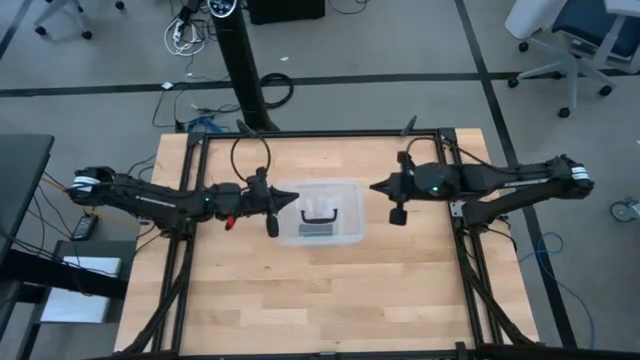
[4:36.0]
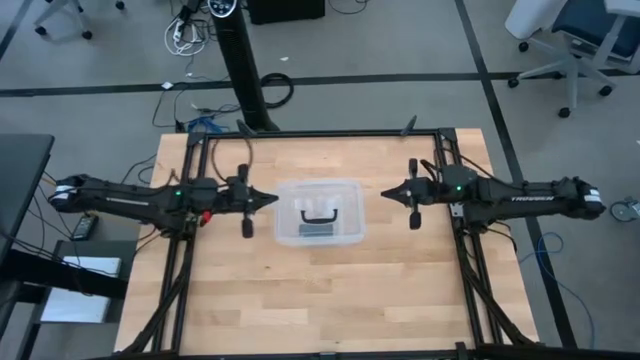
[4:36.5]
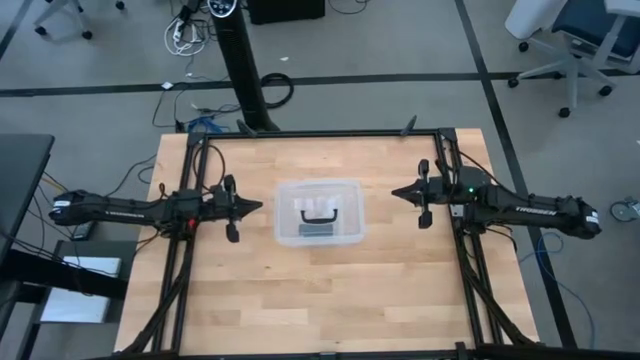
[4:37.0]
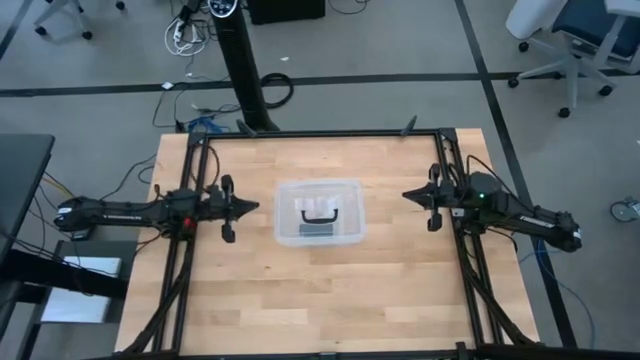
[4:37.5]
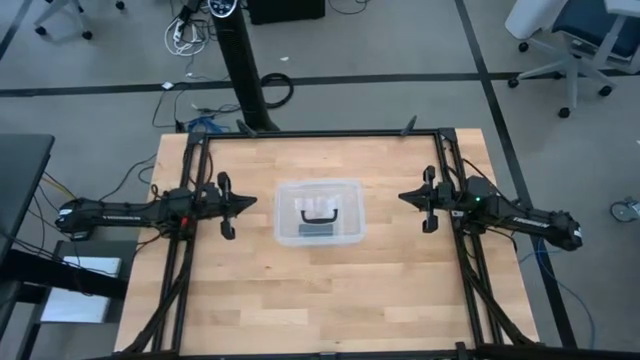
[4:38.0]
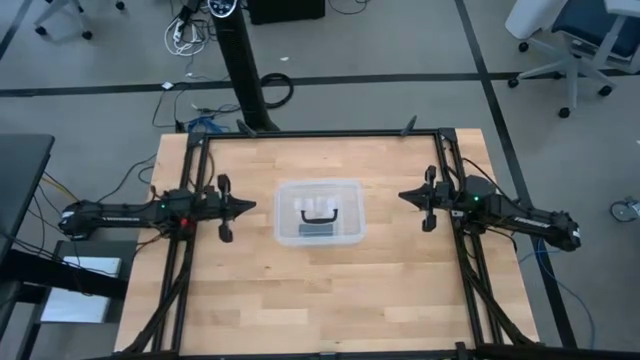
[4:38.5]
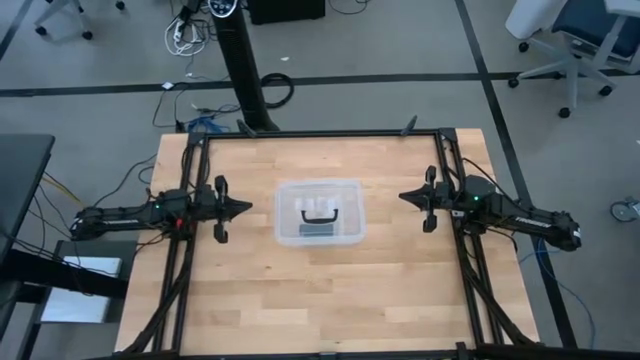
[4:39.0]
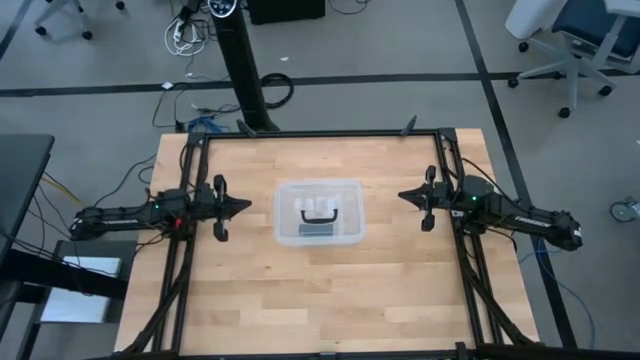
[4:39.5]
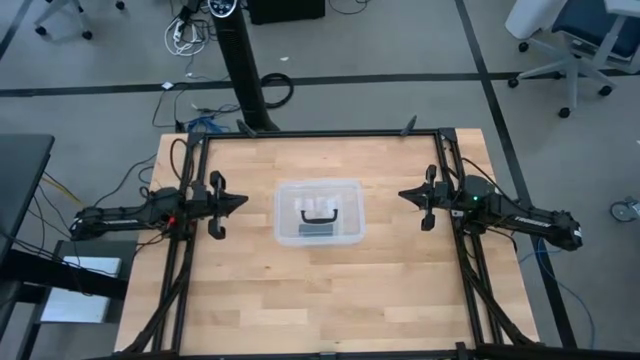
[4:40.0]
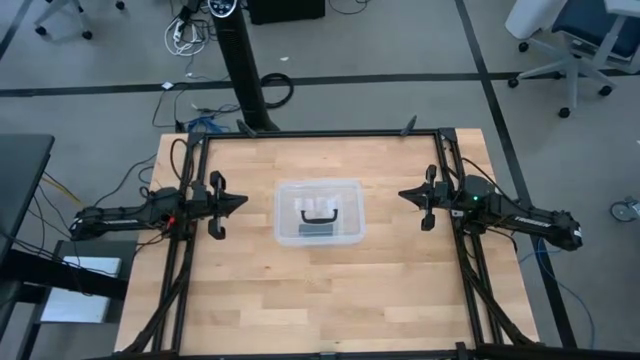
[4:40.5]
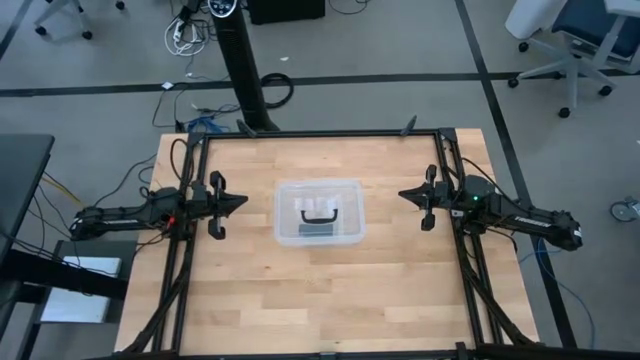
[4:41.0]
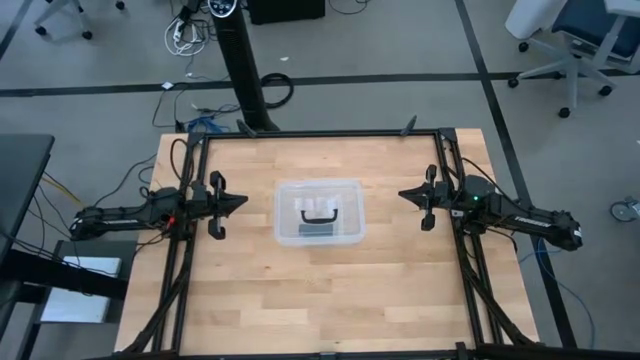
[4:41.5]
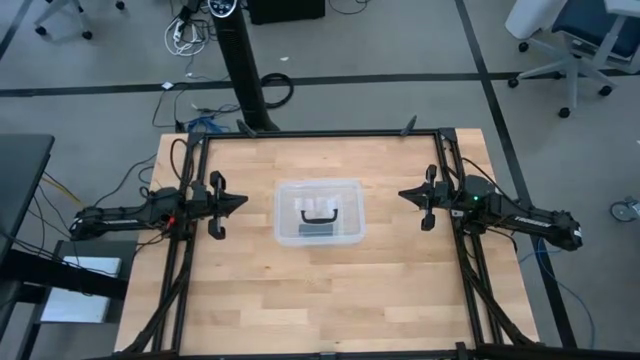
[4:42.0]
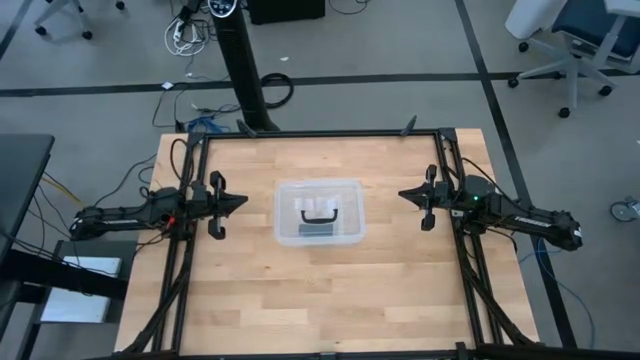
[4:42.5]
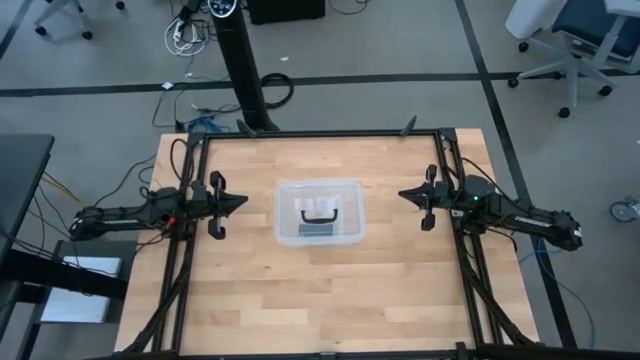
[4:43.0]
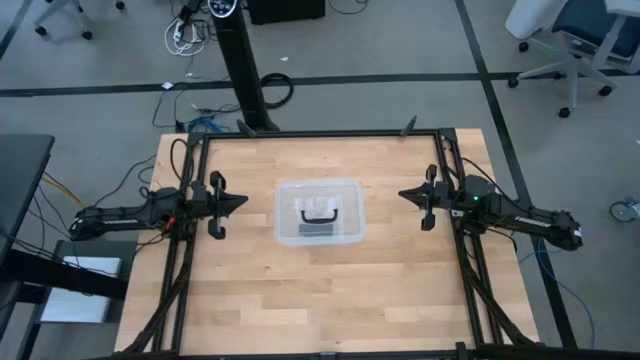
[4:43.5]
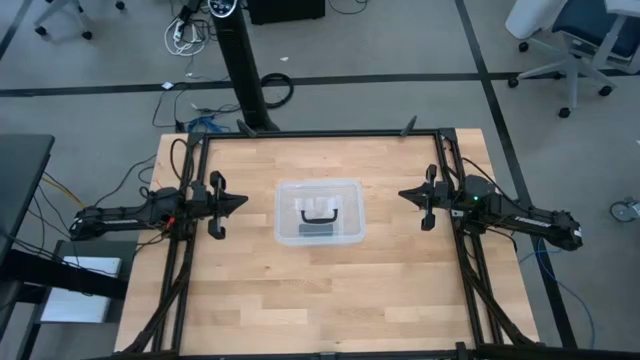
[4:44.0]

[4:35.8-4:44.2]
Task: Roll bandage
Return to home position

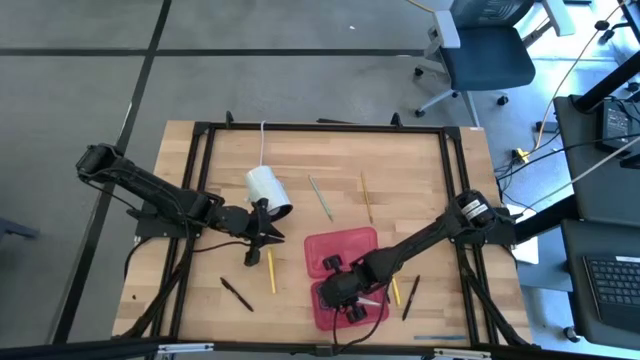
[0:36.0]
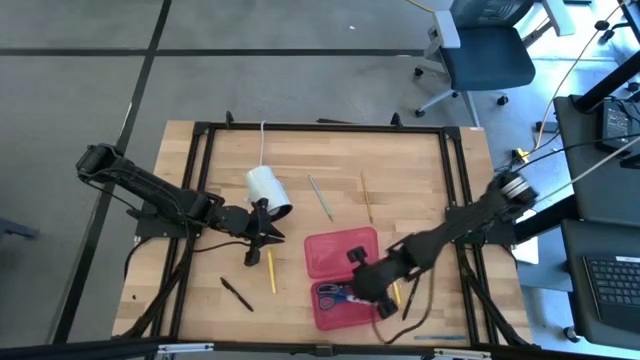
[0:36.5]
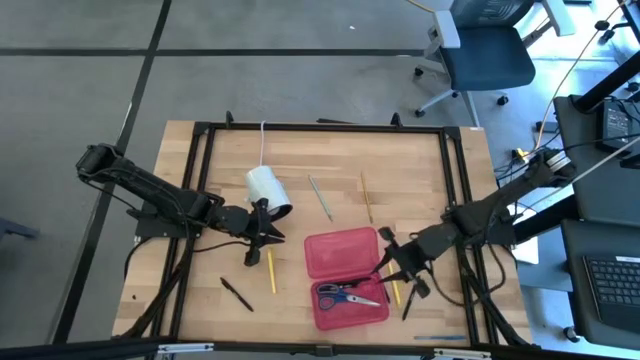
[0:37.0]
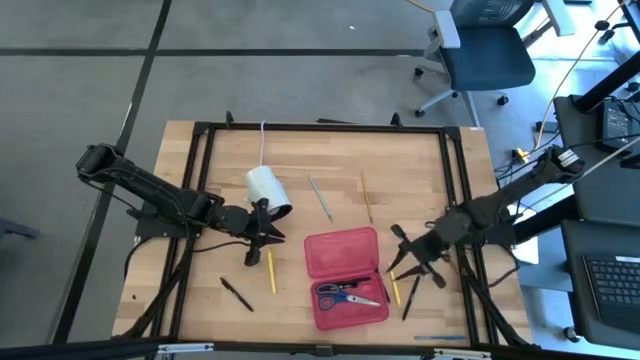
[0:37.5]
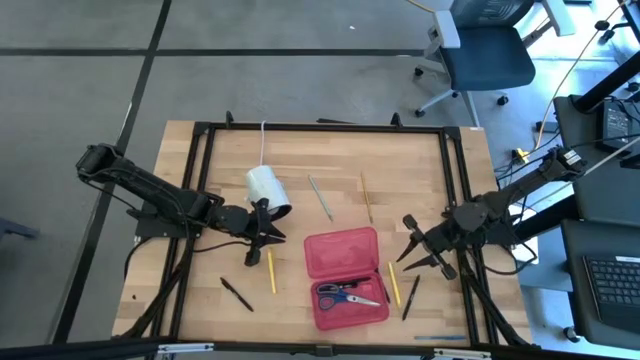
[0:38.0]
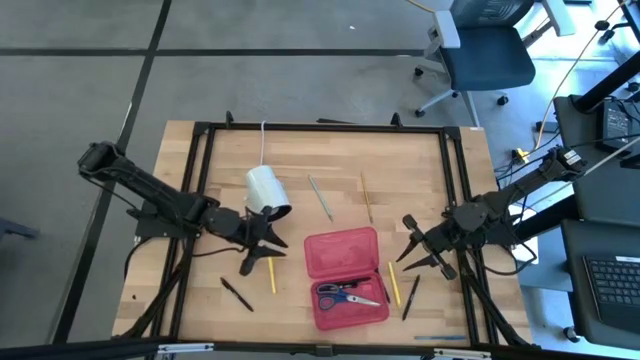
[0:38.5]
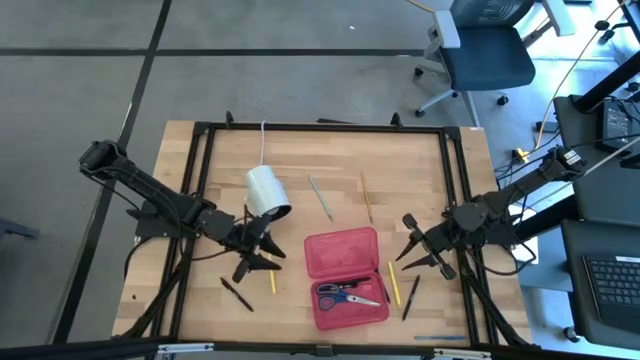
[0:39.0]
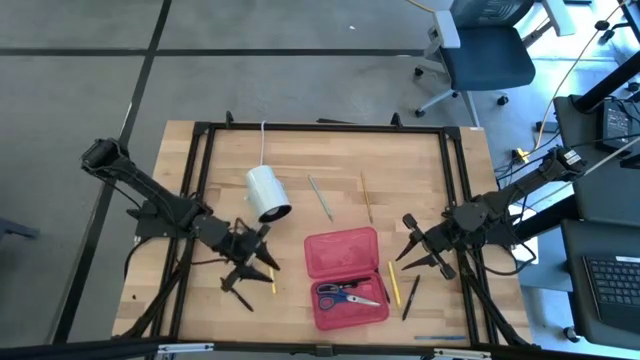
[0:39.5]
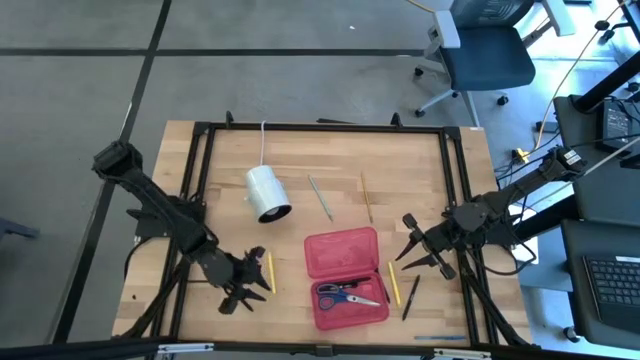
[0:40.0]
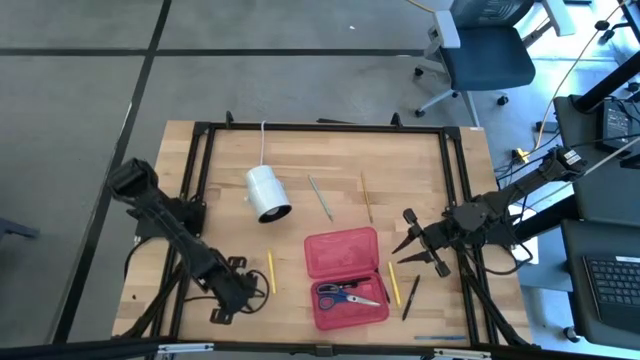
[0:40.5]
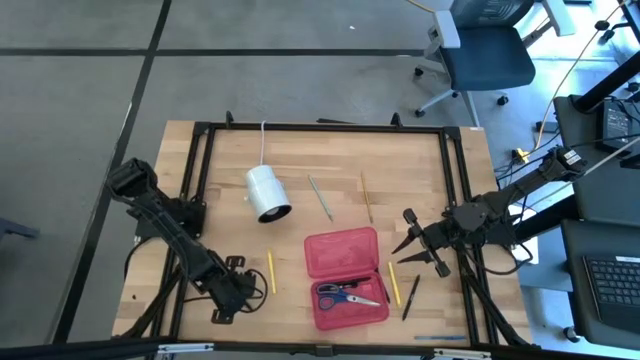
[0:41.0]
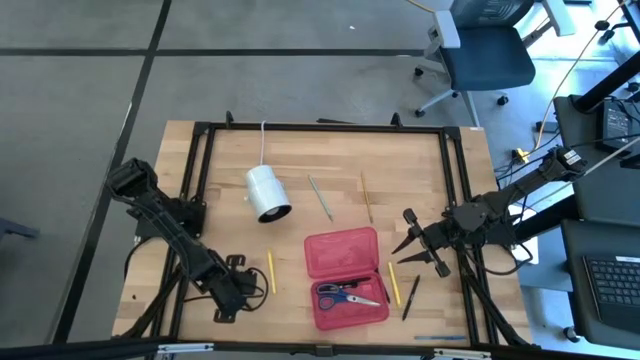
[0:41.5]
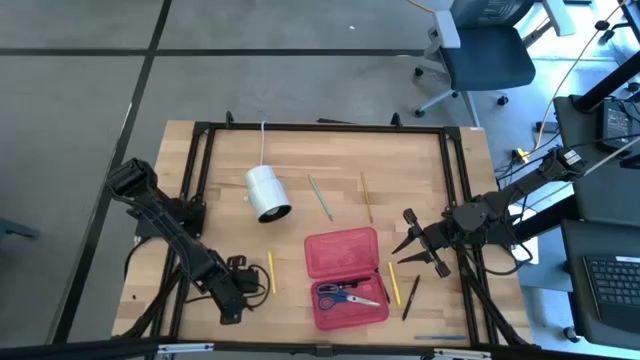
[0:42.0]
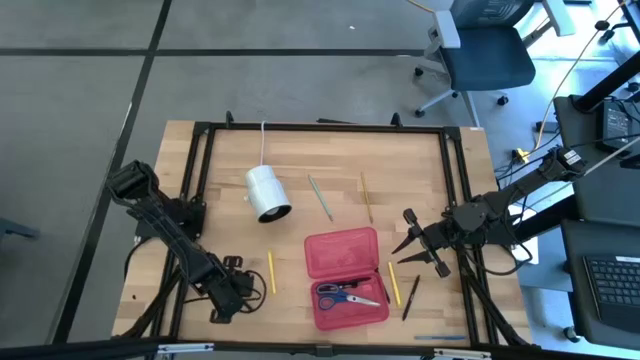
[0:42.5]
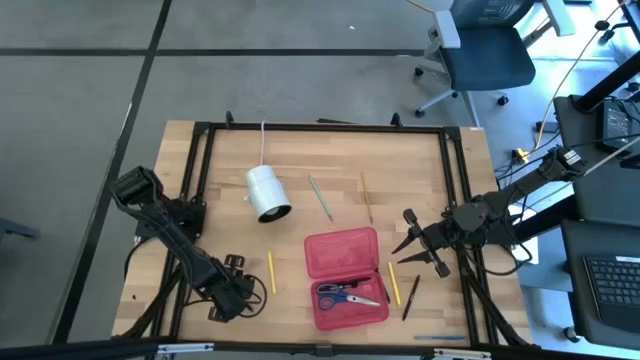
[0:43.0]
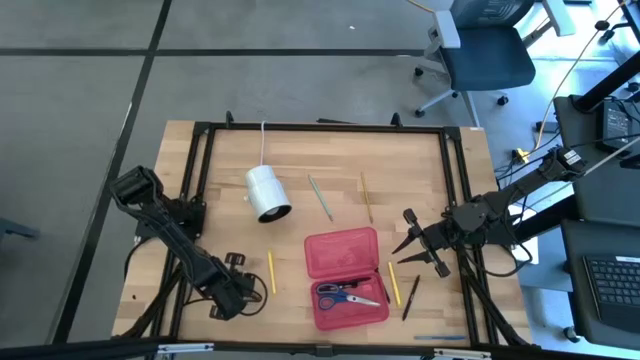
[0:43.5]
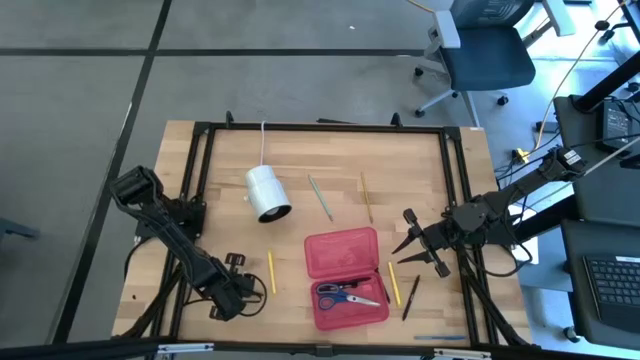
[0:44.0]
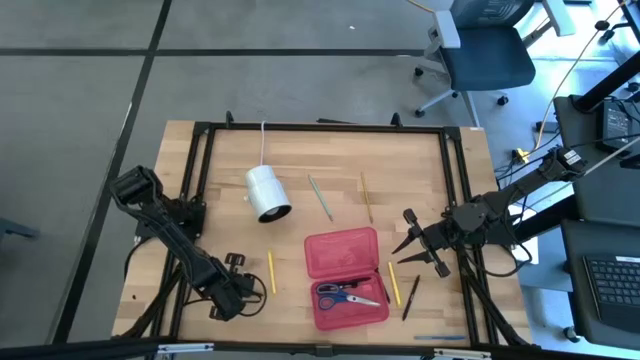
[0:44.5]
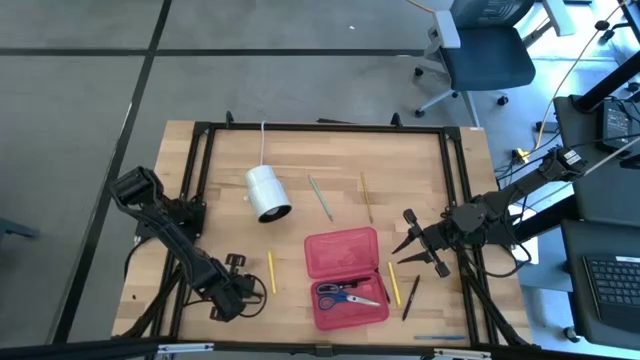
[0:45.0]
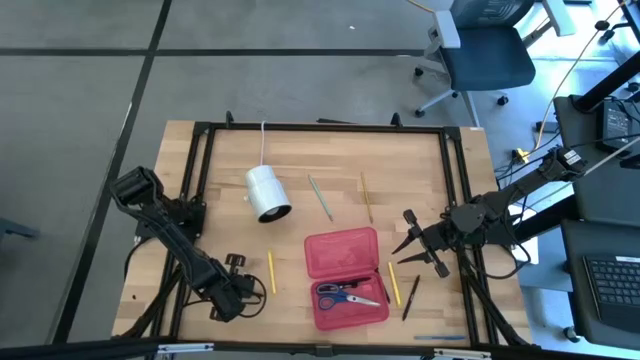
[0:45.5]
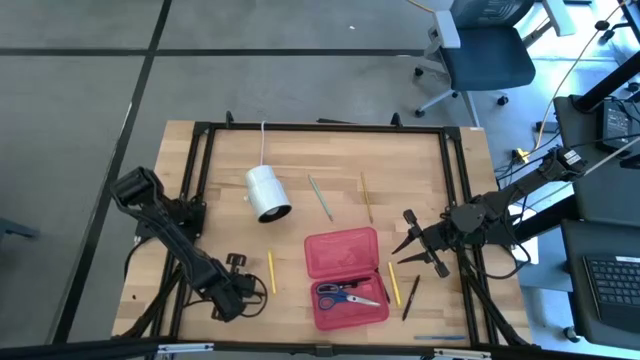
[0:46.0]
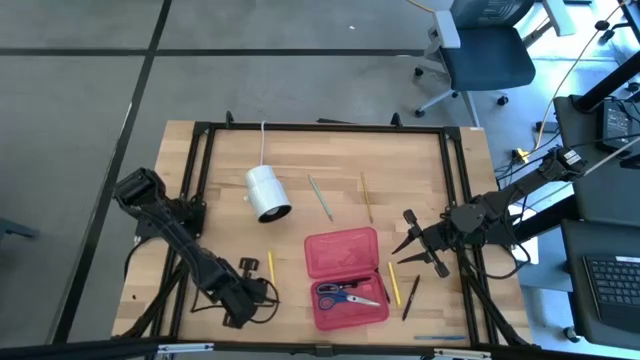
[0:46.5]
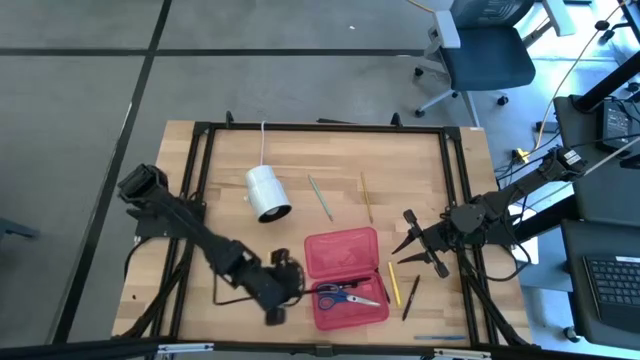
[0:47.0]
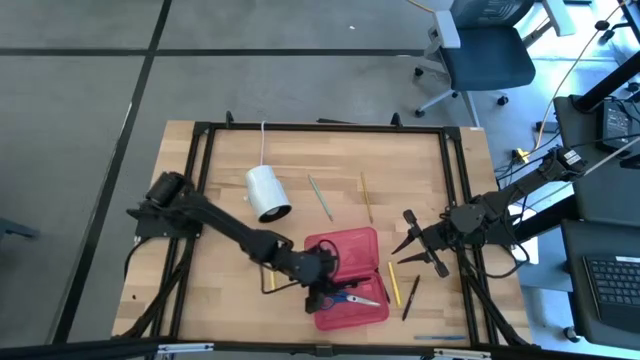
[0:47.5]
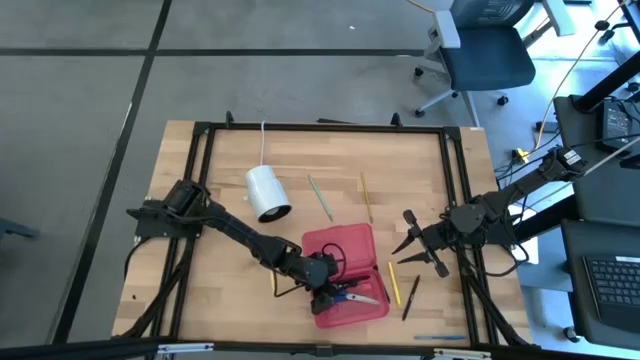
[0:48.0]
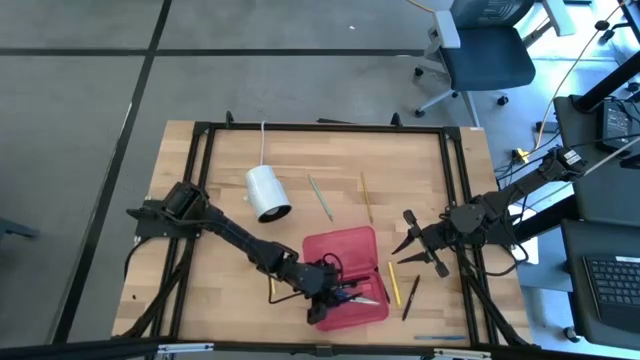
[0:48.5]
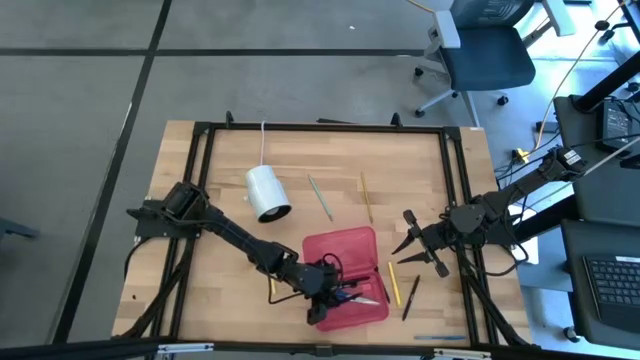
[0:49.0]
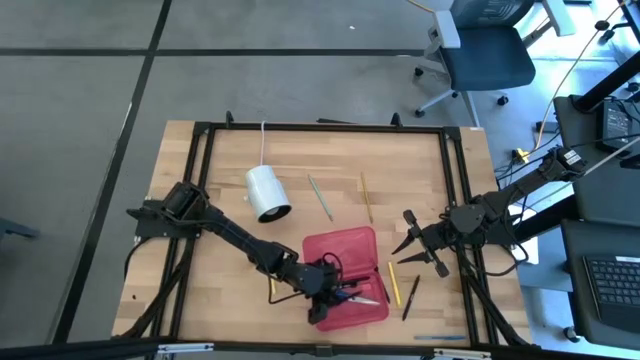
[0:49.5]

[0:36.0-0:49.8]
Task: Pick & place school supplies into a supply box
Put the black pen into the pink supply box
